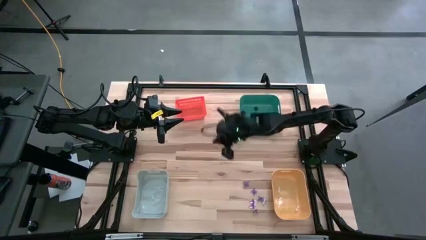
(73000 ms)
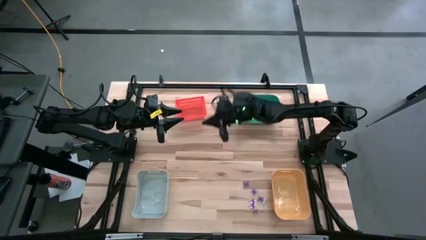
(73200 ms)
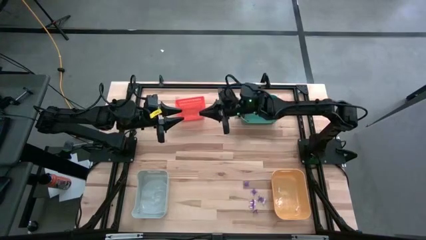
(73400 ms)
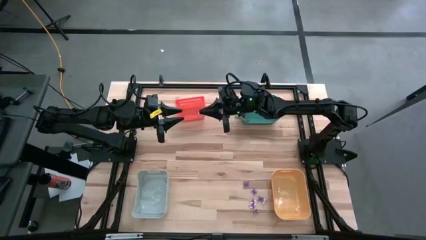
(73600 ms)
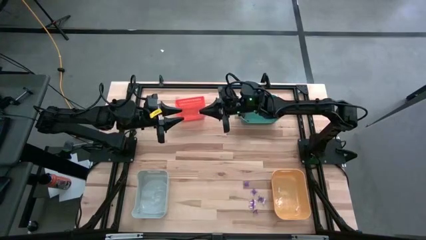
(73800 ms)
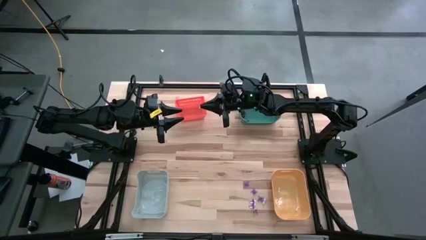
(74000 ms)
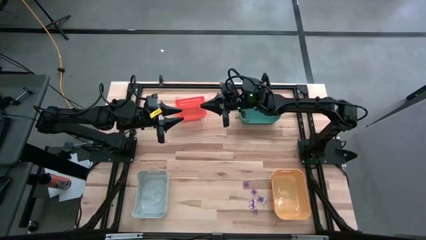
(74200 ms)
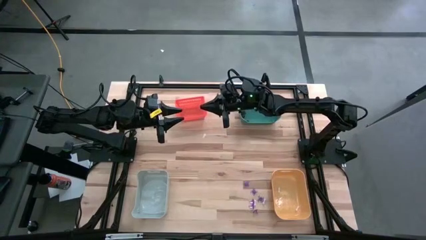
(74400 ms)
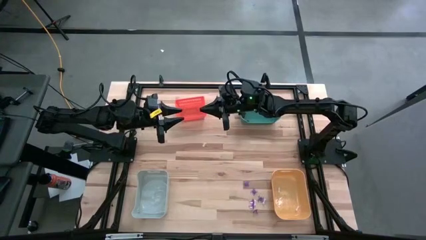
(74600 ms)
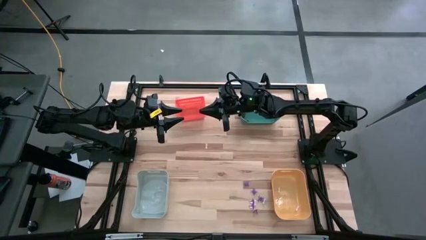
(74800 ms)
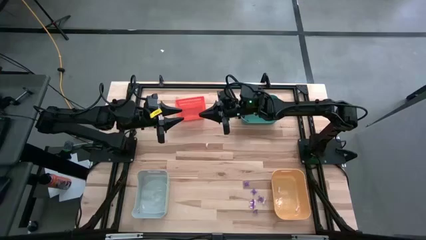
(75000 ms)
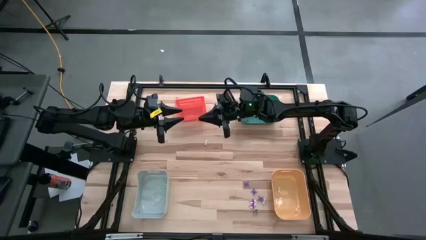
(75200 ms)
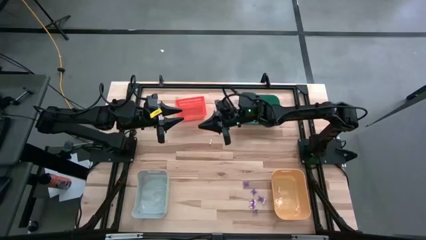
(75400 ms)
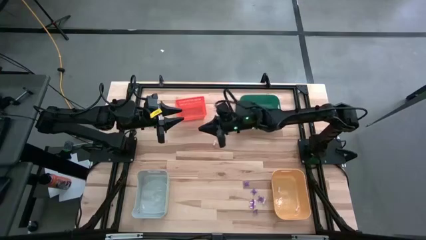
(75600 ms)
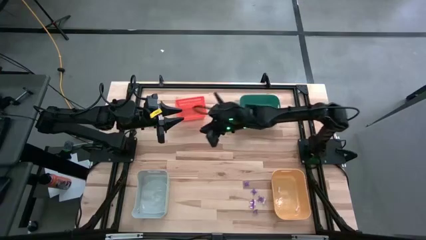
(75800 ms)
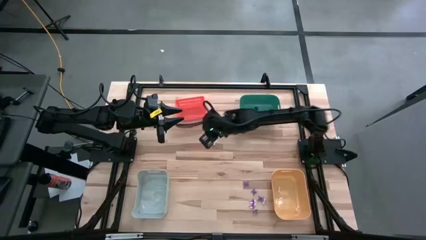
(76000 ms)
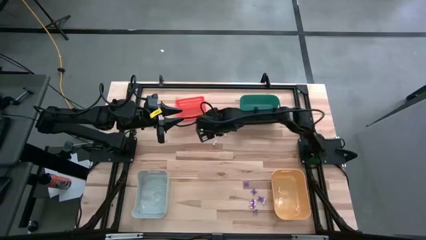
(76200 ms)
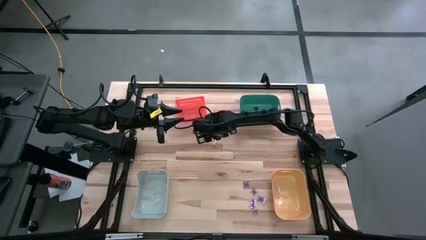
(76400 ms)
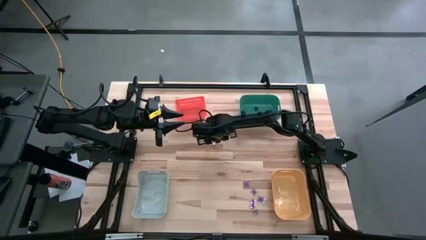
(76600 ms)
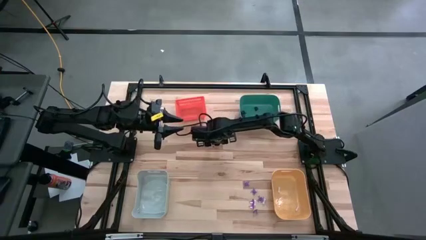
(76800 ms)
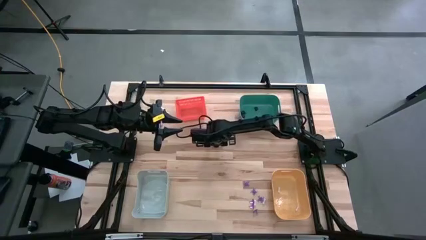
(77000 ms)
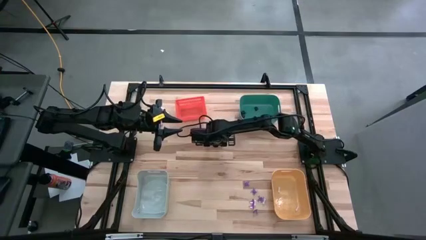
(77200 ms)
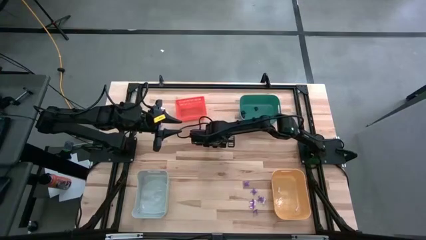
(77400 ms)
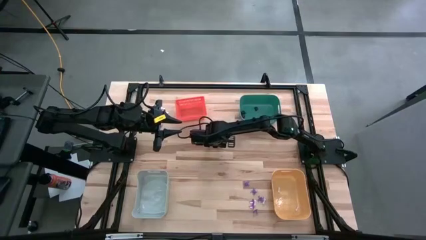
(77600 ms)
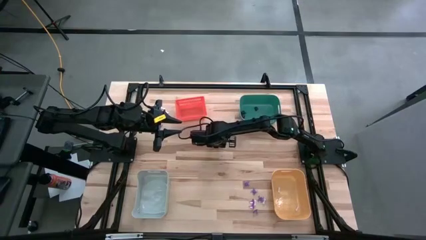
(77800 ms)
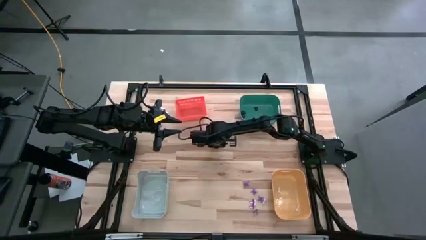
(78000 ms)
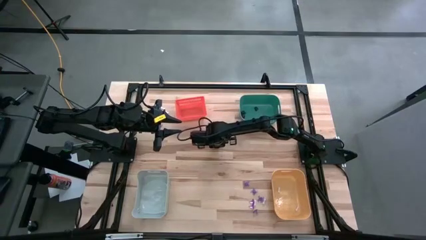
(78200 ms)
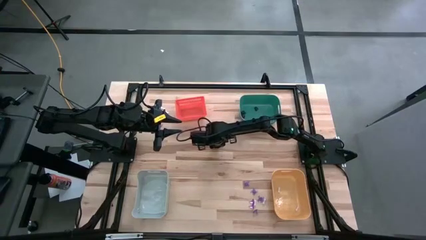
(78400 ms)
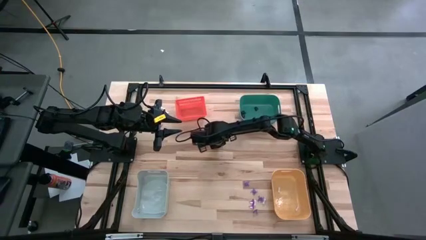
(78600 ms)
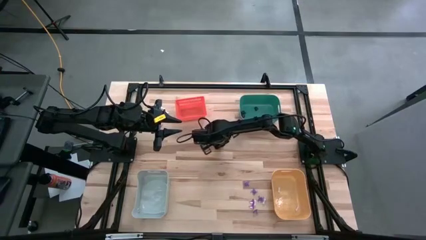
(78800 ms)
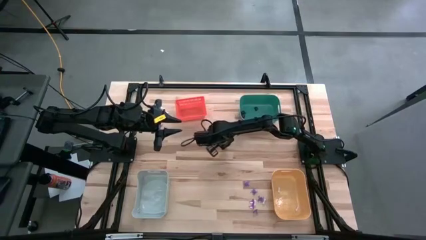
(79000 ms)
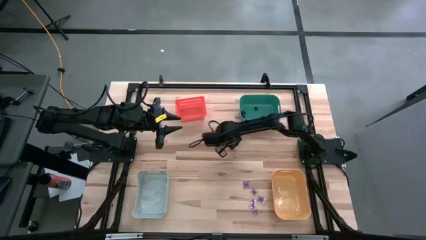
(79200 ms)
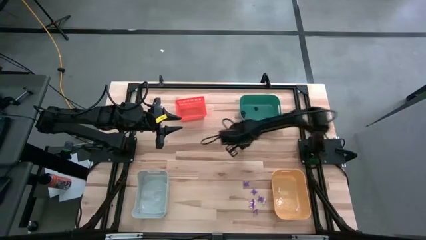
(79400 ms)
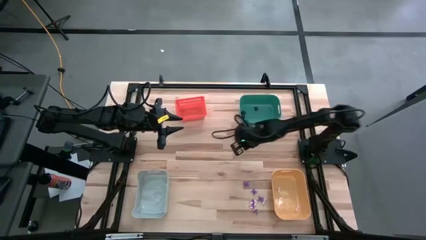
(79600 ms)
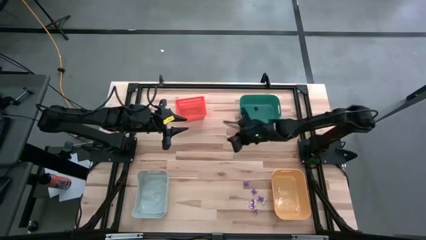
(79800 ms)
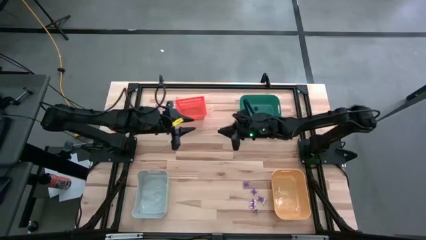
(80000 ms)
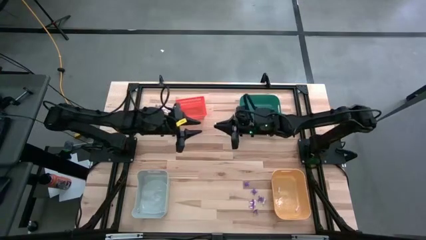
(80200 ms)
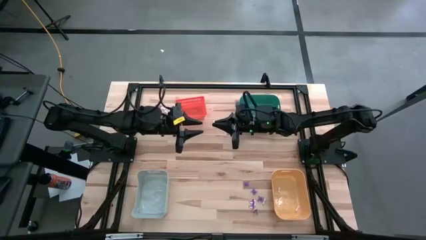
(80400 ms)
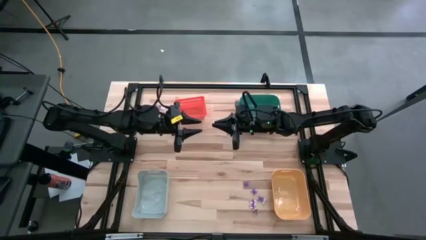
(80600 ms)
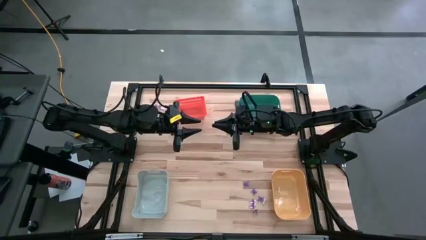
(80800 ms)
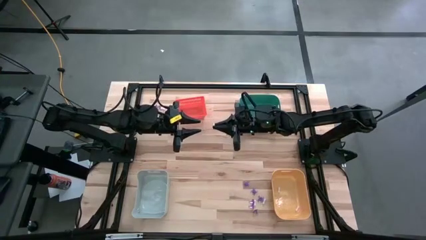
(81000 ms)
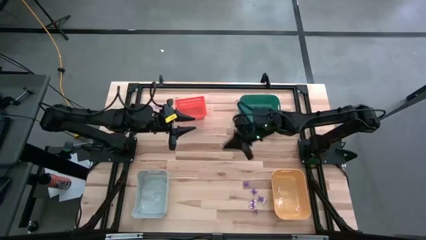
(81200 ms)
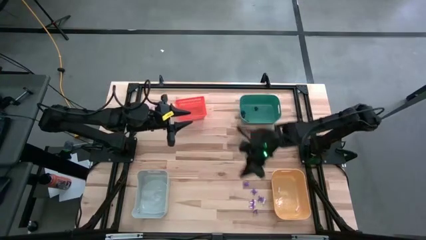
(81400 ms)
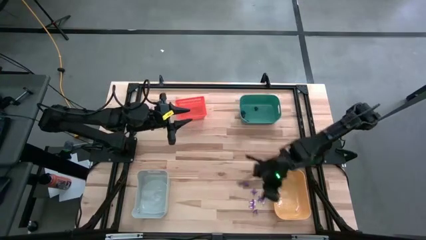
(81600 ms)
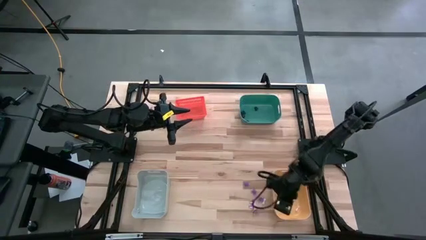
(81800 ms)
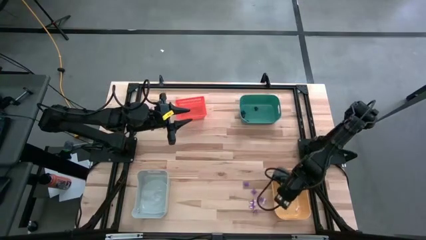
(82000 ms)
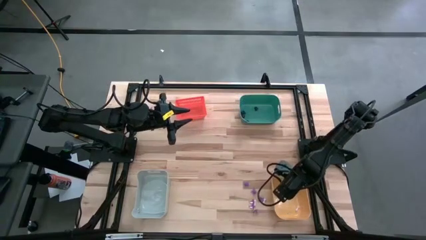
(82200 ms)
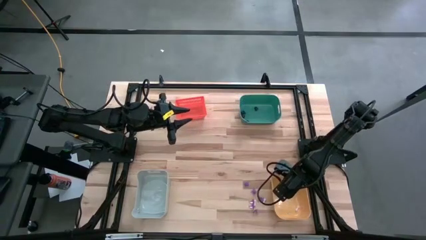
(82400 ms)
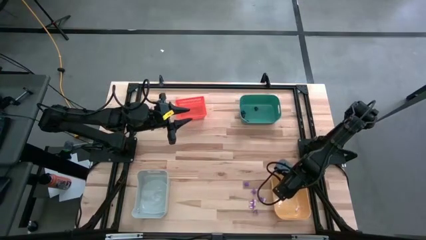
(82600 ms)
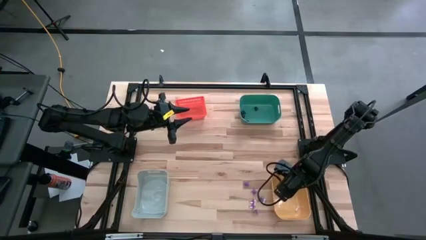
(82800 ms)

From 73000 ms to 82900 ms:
Task: Sort Halloween decoration
Put the white bone toy into the yellow bin

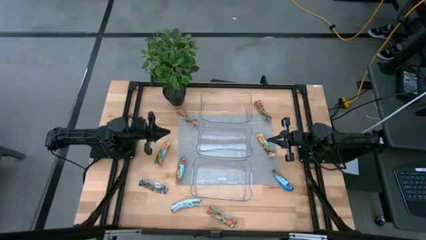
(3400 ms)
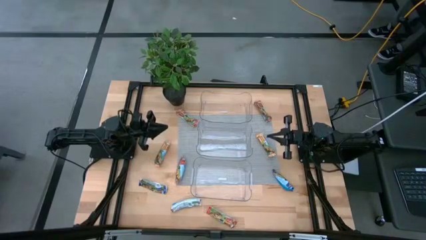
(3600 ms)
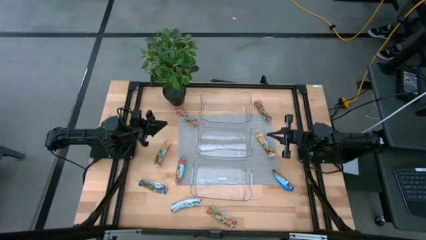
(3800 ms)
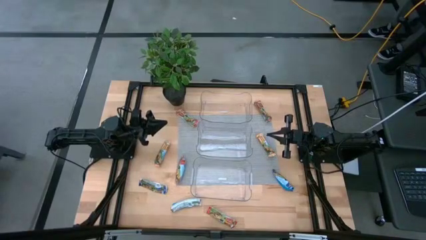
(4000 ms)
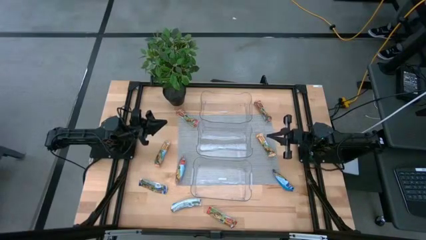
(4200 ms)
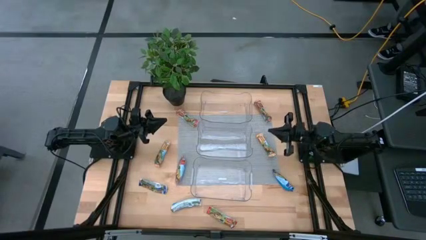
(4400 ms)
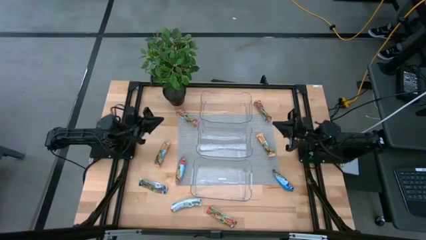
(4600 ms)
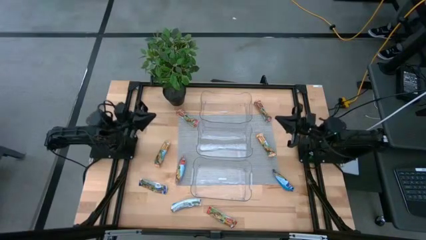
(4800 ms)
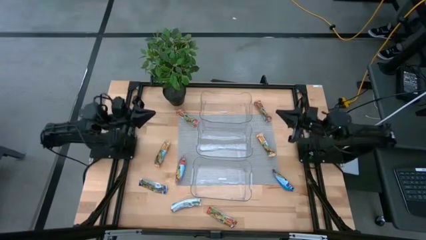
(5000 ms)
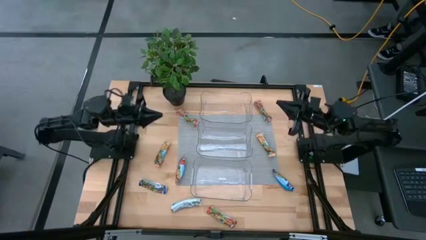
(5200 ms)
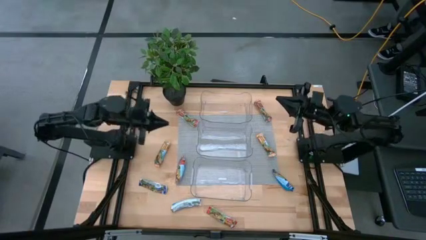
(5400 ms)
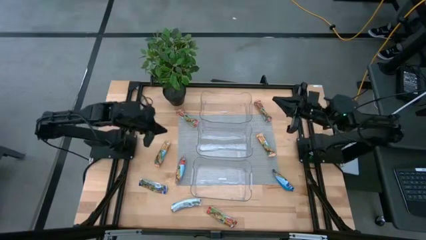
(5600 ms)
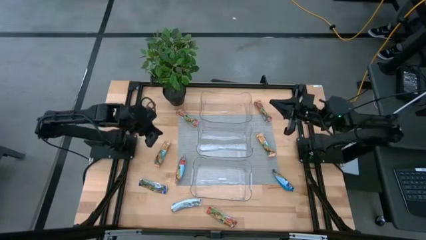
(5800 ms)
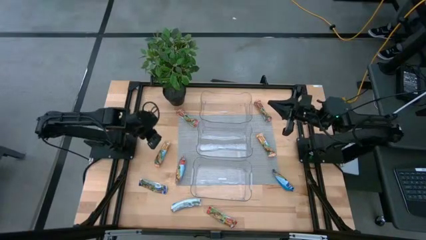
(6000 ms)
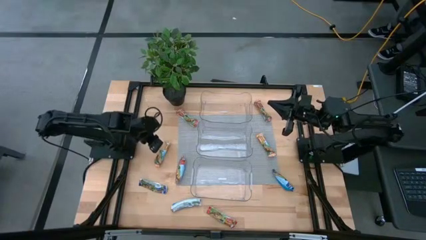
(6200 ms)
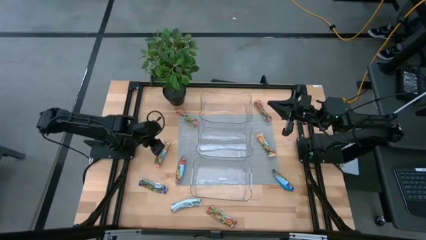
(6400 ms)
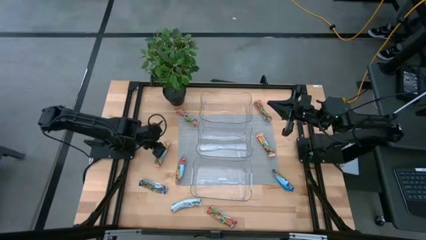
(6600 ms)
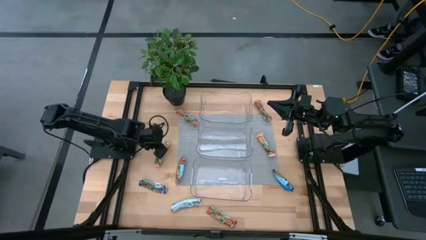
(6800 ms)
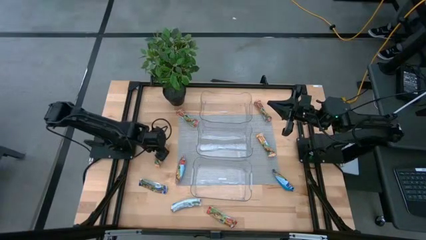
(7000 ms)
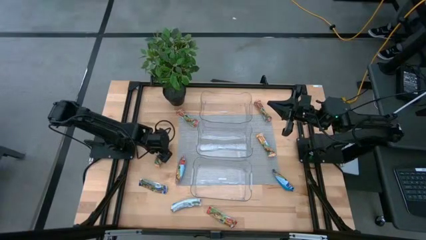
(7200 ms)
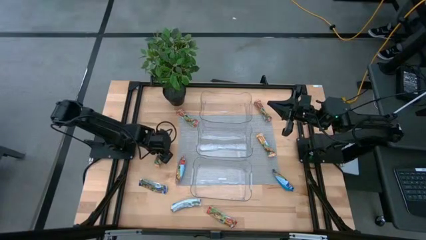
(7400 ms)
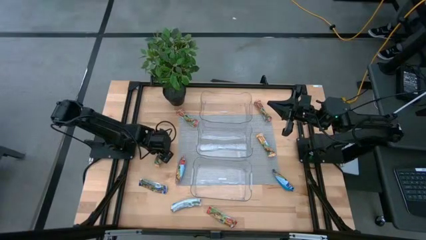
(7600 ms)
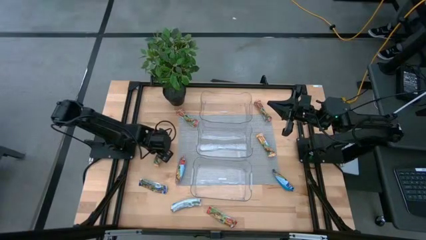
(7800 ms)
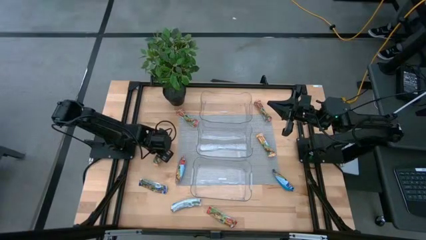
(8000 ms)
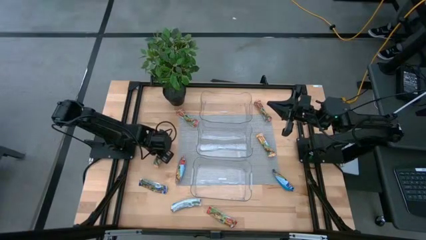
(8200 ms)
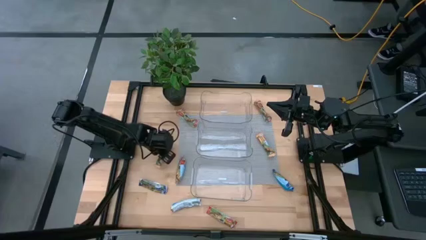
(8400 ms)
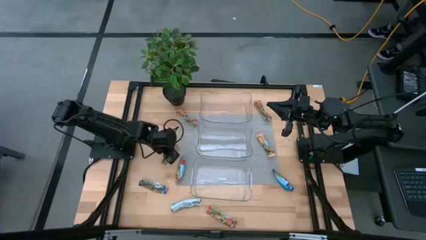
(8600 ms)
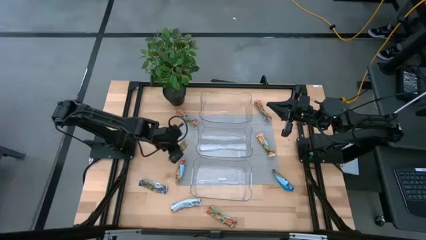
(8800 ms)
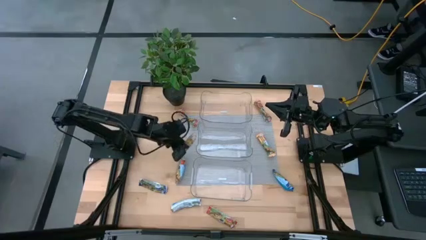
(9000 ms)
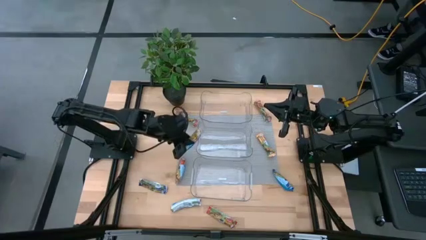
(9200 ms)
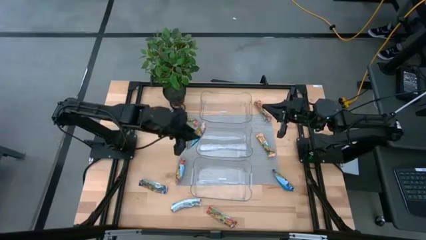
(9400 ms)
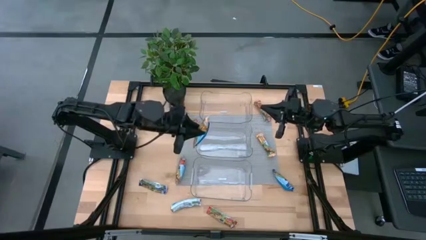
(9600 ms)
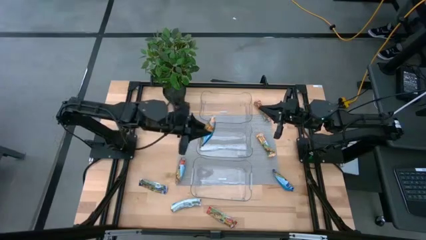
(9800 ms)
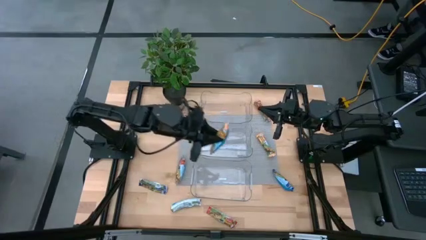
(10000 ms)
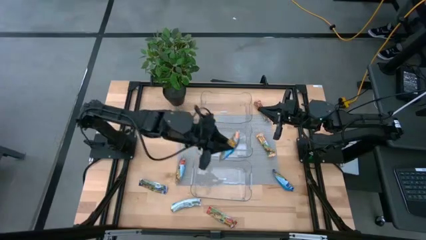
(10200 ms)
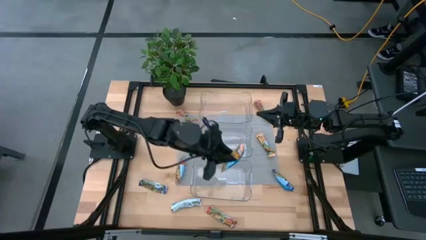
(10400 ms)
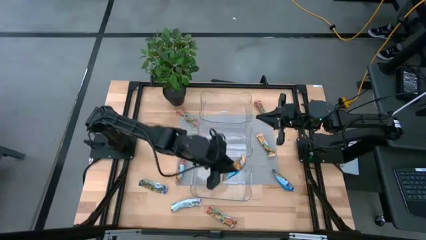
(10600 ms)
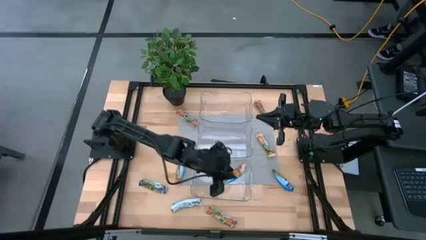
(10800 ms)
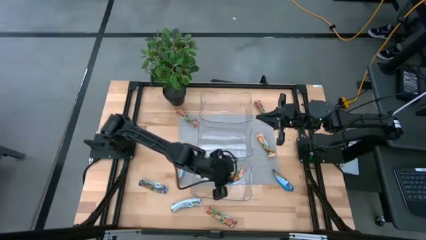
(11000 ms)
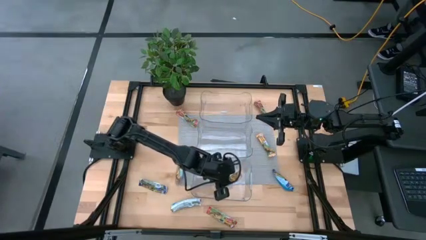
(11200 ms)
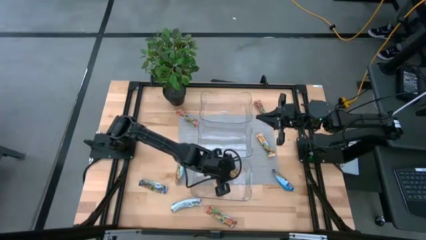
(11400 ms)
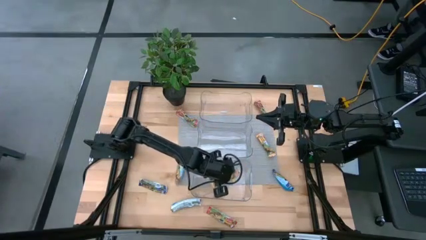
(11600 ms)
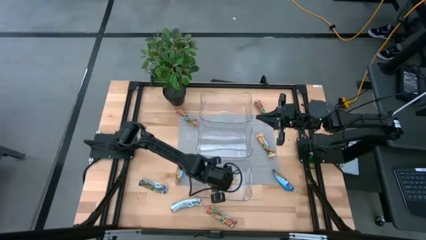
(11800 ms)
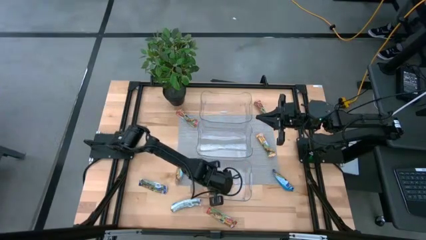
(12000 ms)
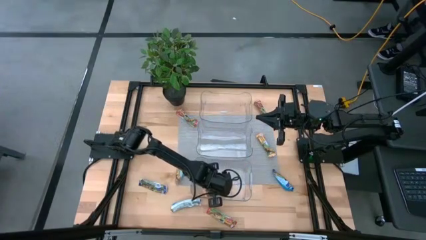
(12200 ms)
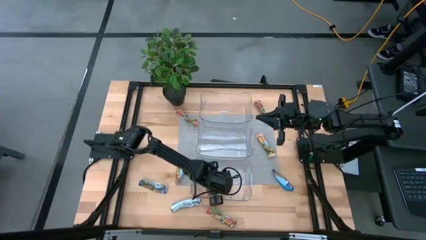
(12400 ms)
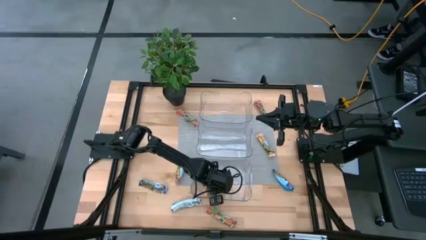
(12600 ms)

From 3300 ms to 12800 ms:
Task: Pick and place Granola Bars by type
Put the yellow granola bar into the bottom transparent bin
